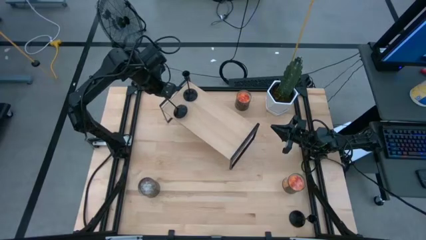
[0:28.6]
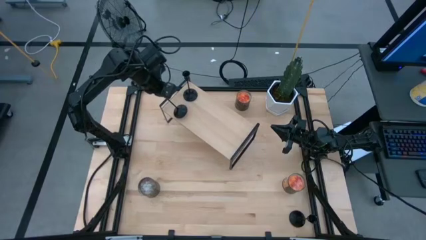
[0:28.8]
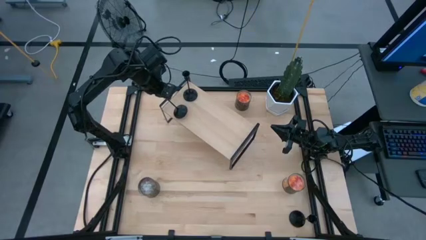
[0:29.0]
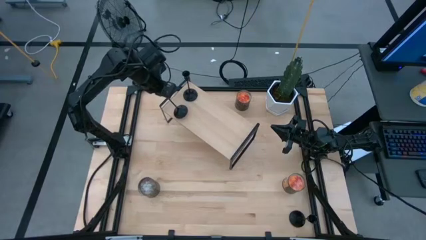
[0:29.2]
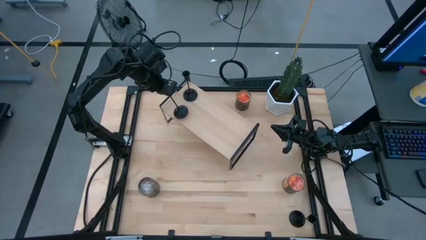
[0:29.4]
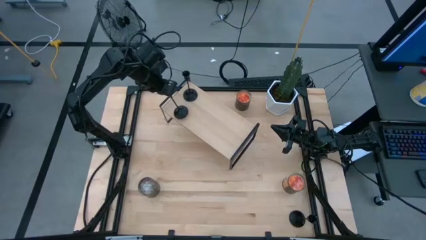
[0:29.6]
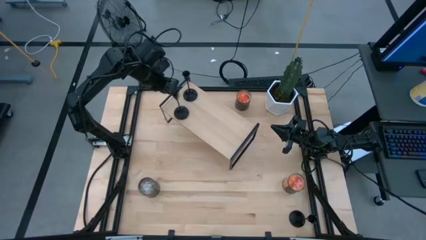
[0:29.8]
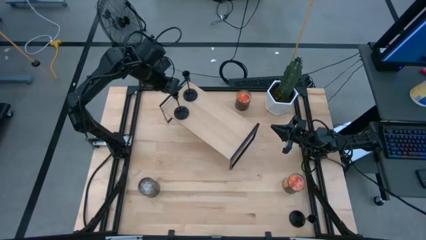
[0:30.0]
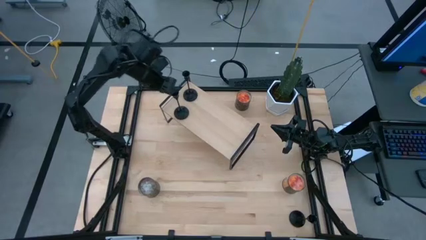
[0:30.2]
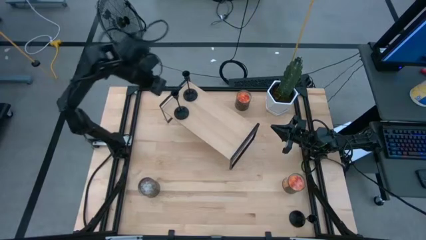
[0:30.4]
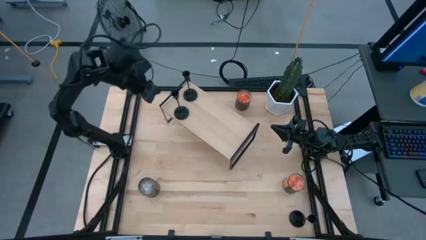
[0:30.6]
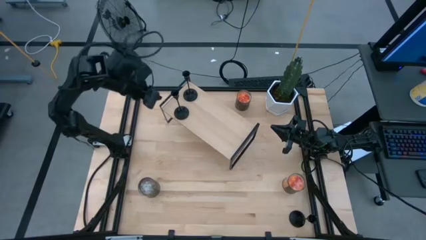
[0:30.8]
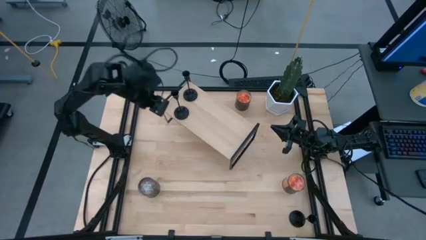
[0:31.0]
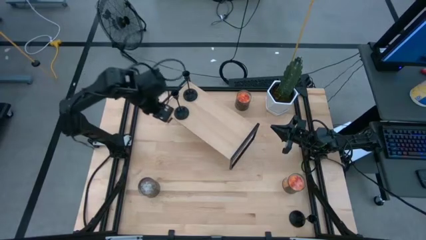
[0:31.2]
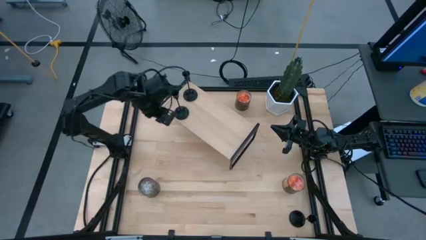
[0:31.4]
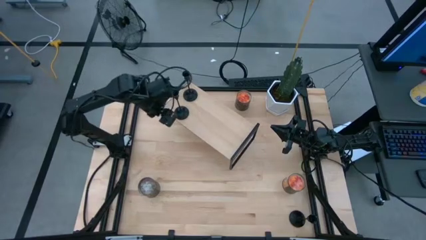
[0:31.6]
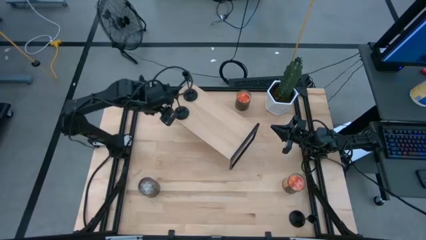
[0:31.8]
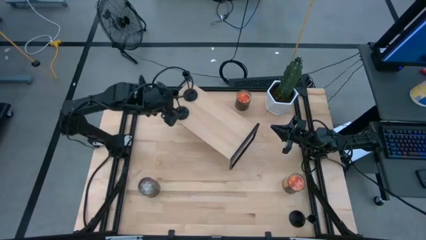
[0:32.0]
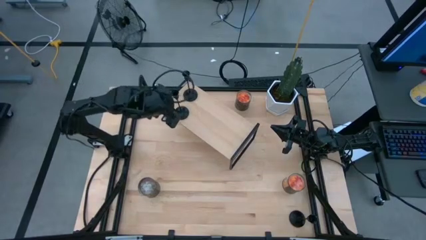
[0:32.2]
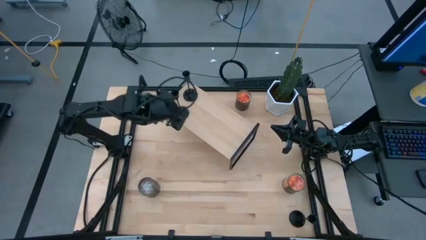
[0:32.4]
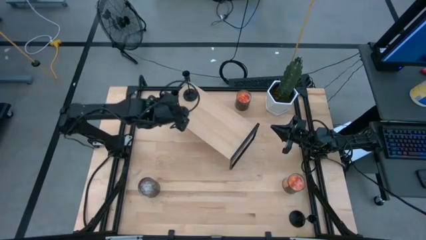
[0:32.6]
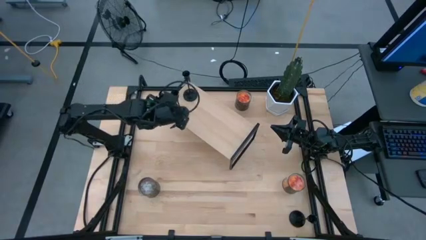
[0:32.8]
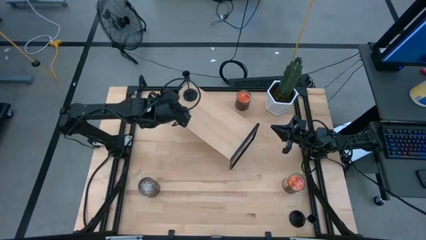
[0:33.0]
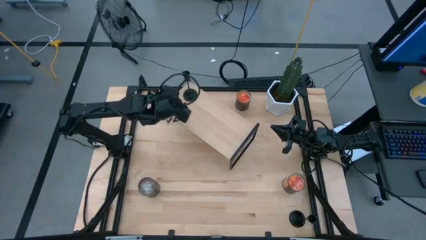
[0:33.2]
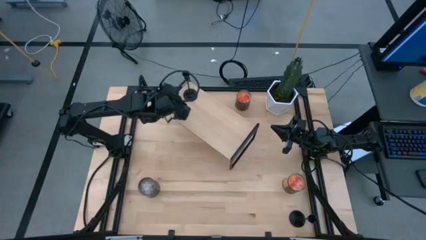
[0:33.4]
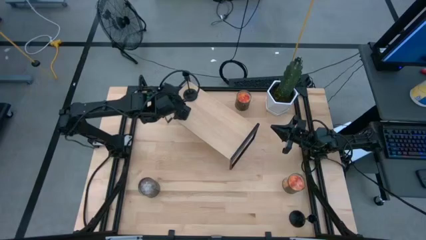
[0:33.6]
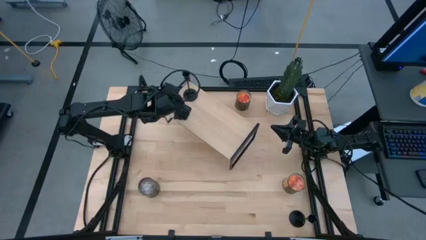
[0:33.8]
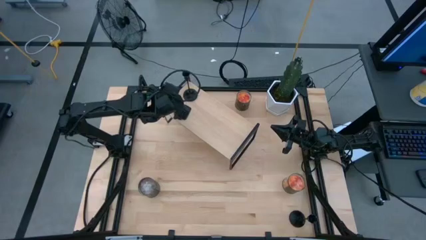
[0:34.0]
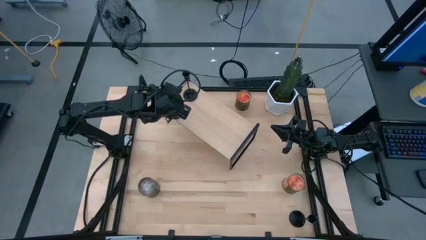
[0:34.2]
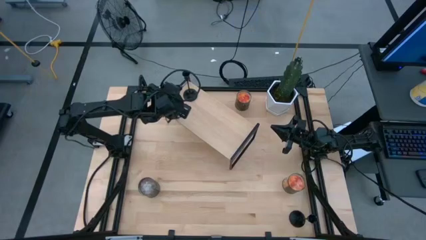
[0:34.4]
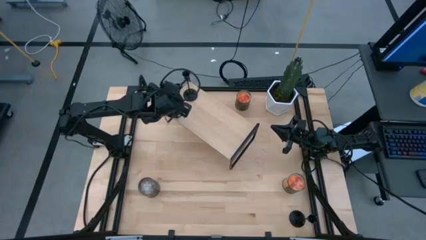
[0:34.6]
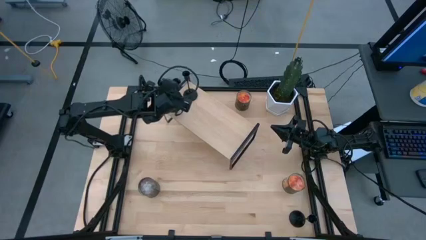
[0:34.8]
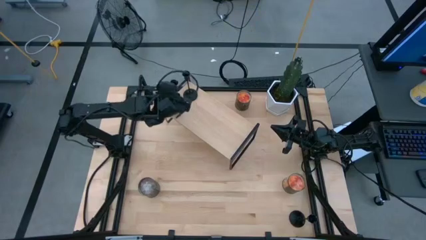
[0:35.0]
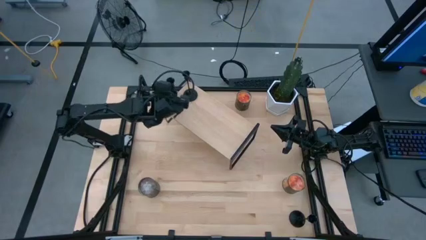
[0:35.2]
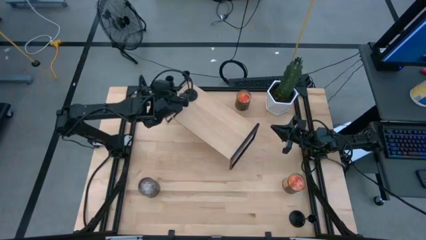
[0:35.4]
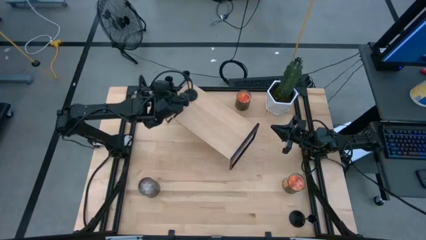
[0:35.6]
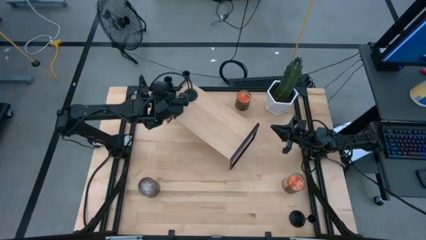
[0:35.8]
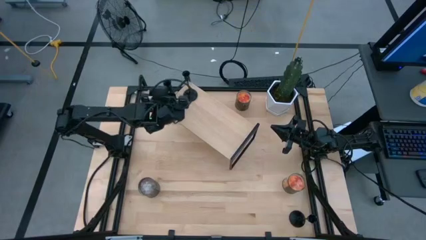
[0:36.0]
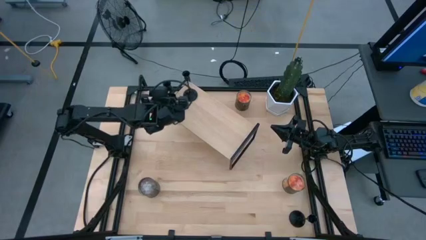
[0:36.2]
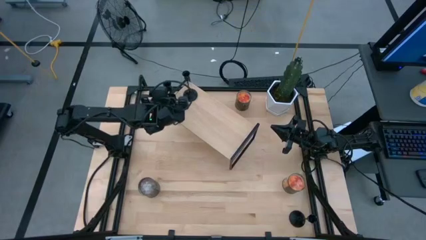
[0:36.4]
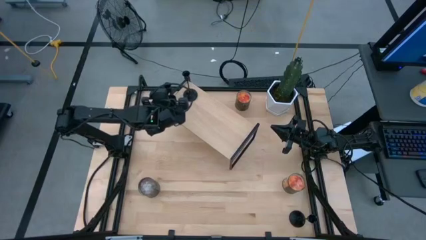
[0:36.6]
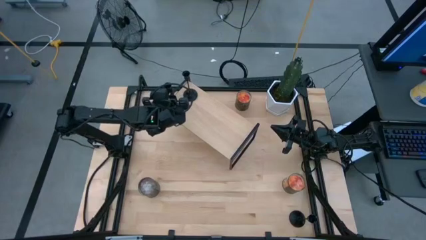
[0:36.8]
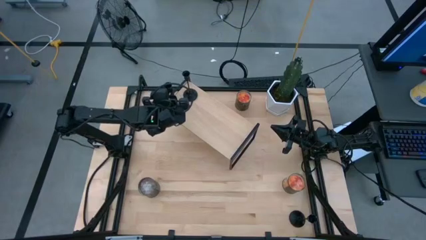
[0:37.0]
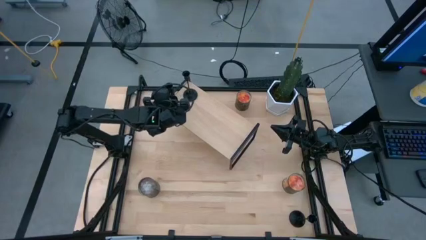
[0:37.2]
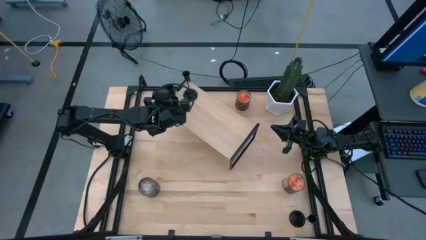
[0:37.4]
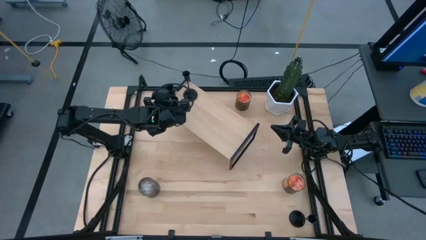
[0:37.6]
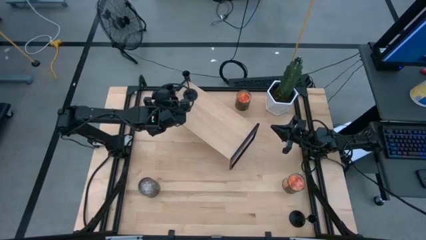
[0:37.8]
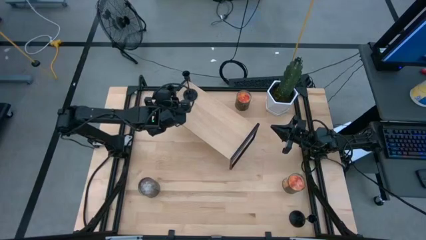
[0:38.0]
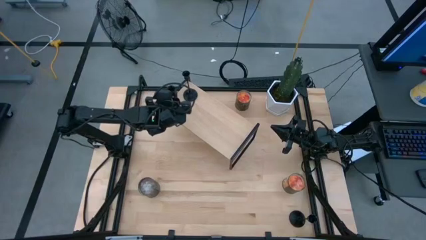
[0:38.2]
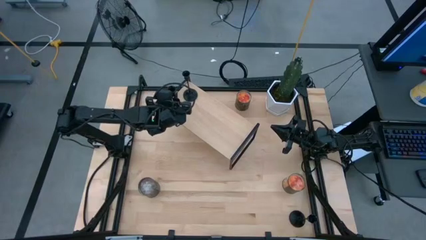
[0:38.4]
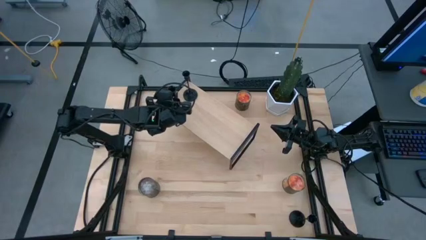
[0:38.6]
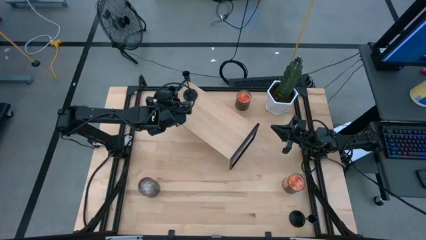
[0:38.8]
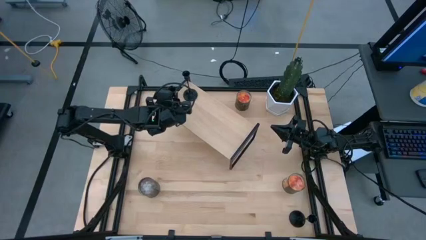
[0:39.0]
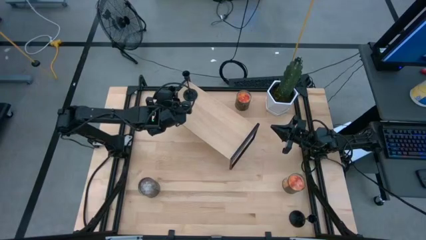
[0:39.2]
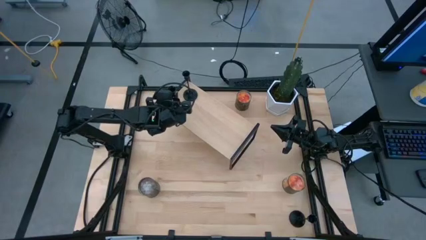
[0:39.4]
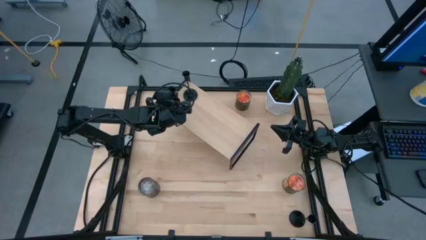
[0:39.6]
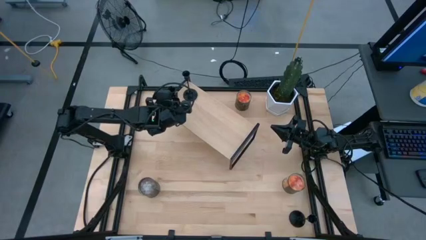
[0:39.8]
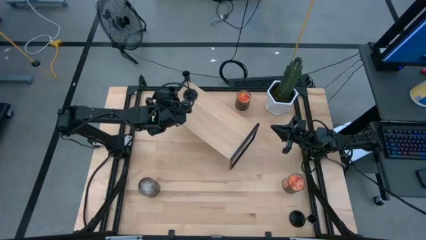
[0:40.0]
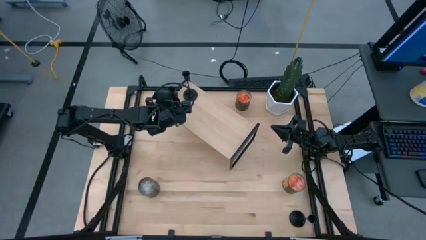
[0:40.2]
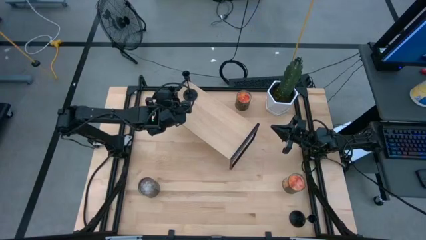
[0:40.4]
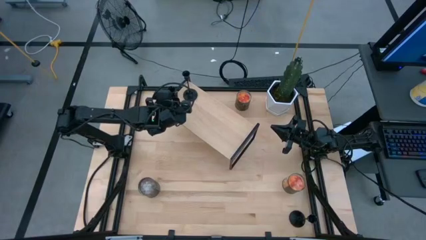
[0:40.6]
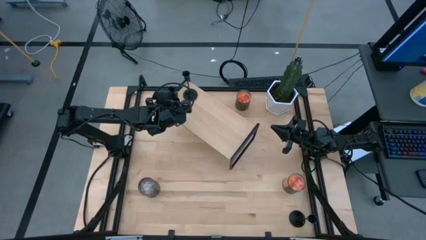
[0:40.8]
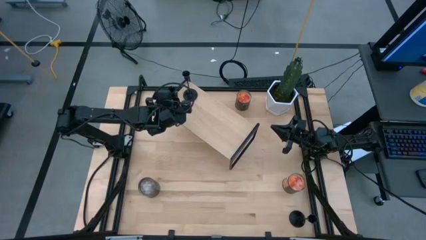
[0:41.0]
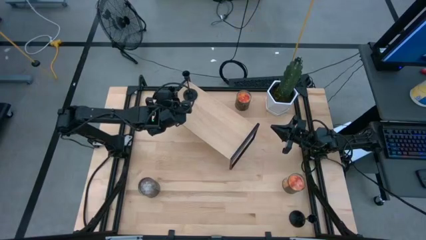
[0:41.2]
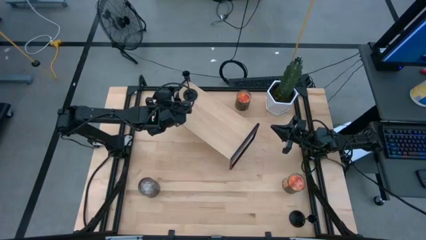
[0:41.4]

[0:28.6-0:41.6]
Task: Pick & Place candle stick holders
Put the left black candle holder on the shelf

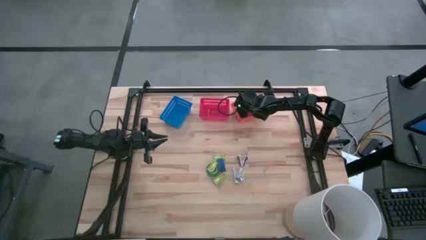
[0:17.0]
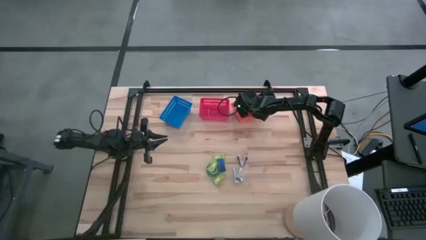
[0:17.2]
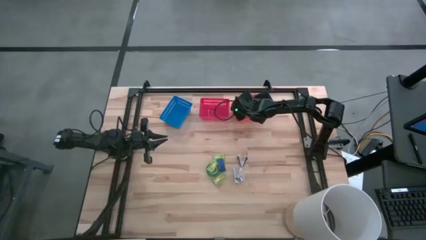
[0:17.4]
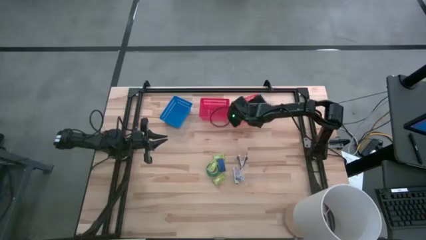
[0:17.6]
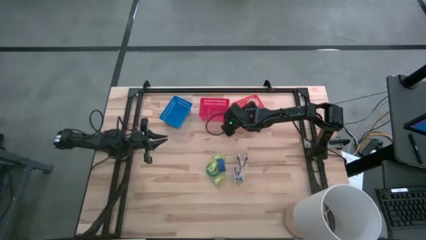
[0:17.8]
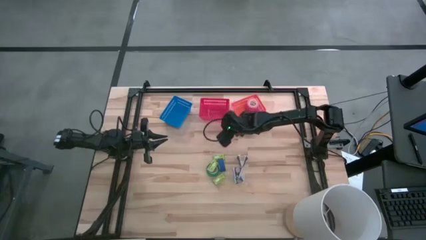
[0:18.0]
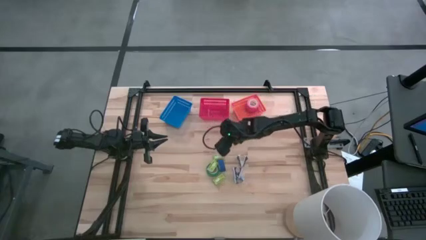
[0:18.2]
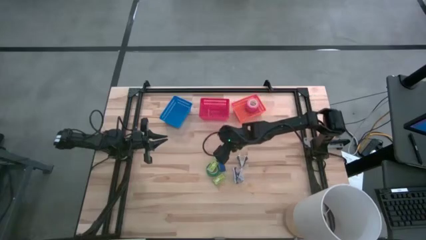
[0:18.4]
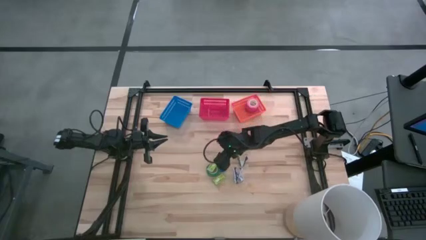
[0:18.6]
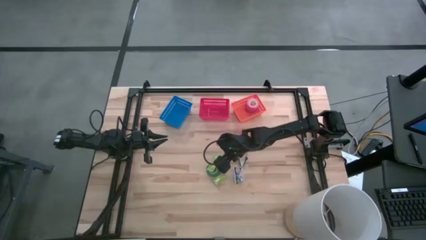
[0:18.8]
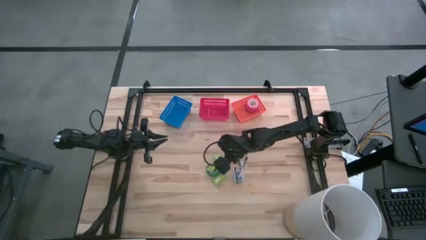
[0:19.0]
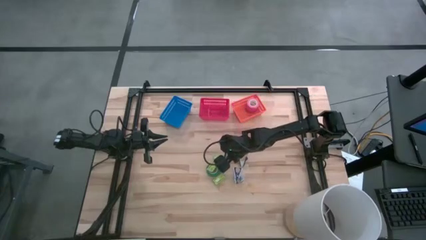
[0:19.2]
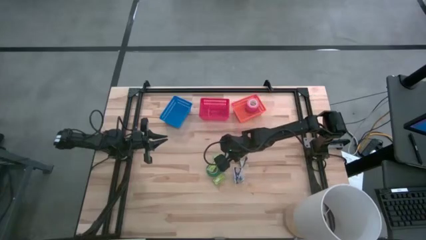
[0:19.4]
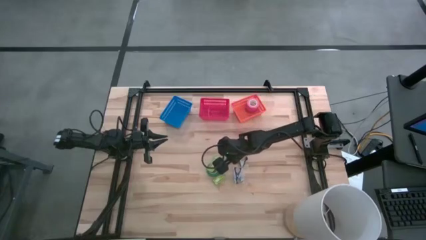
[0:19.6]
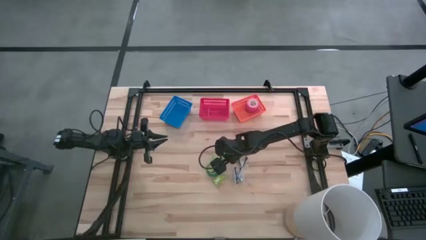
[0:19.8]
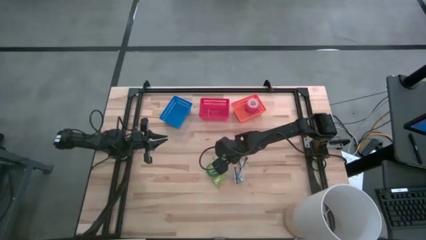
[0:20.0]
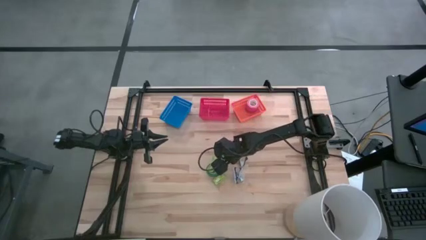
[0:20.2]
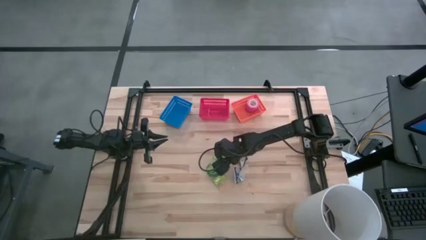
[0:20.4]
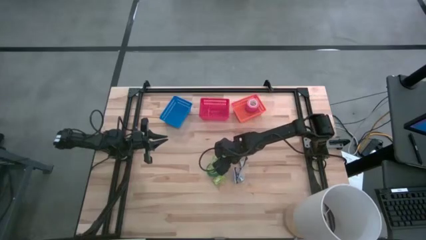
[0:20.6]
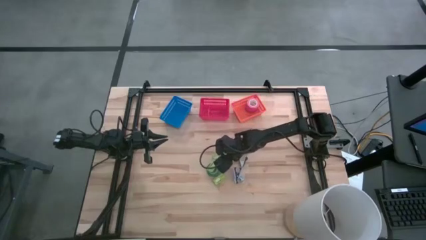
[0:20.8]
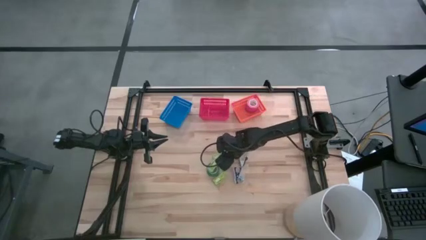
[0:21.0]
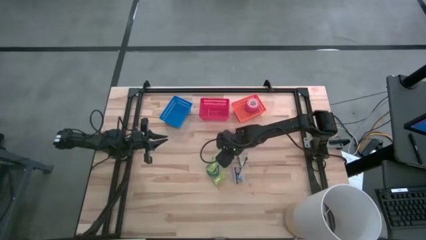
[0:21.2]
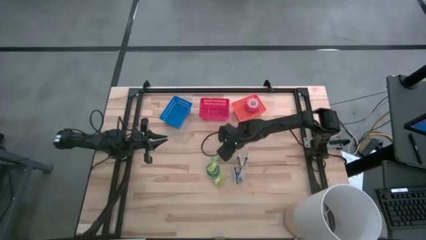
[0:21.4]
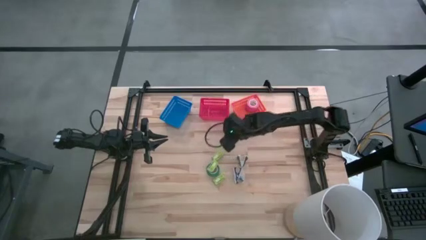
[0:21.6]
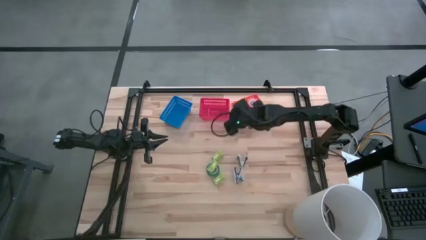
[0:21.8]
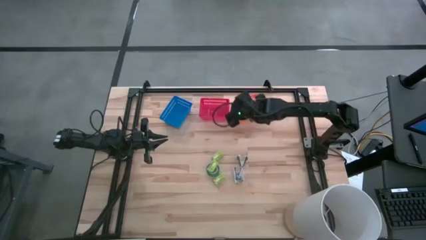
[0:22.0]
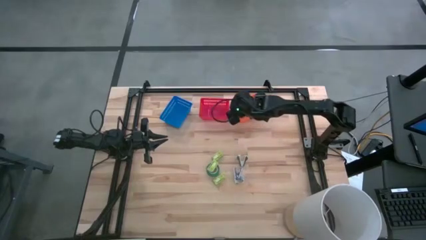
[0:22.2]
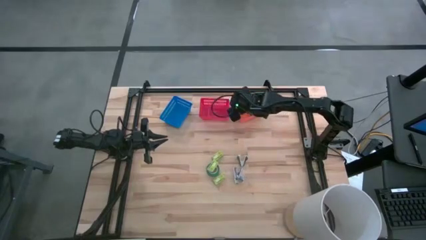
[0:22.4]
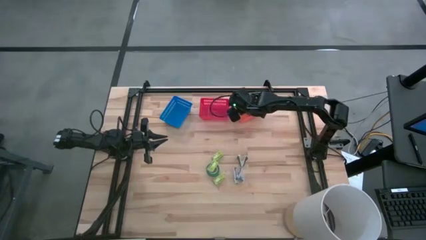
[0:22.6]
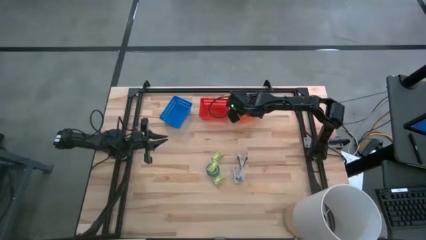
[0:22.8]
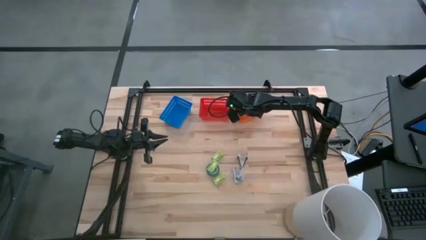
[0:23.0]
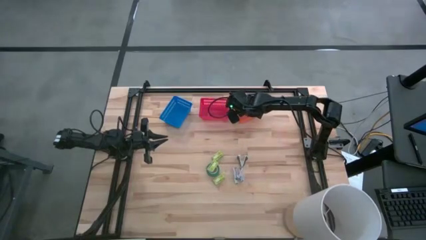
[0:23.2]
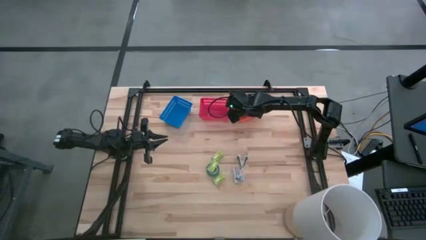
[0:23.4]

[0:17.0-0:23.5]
Task: Pick and place Stapler, Stapler remover, tape
Put the blue tape into the orange bin
